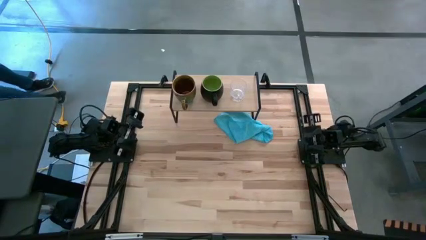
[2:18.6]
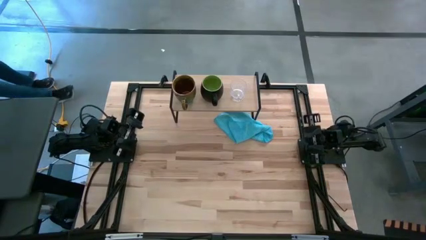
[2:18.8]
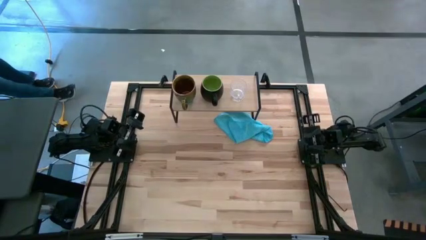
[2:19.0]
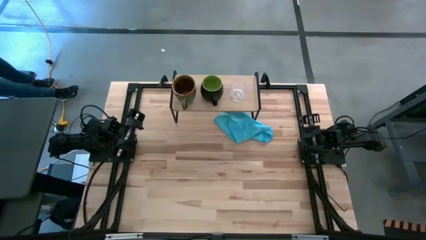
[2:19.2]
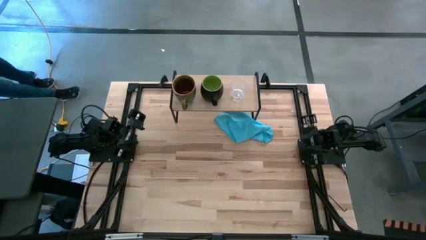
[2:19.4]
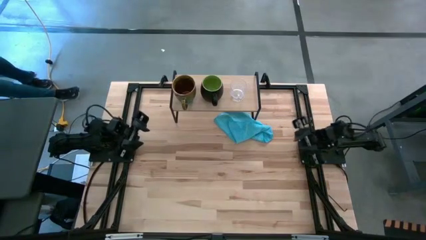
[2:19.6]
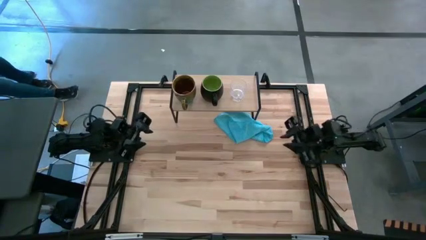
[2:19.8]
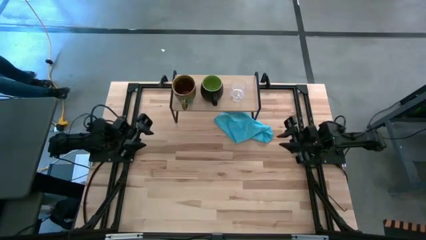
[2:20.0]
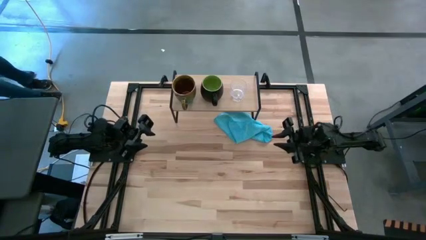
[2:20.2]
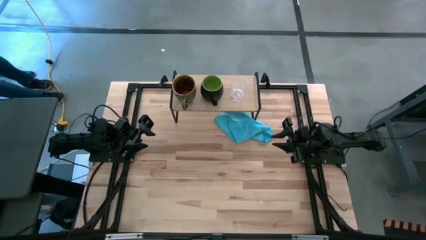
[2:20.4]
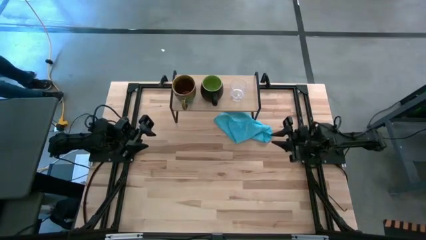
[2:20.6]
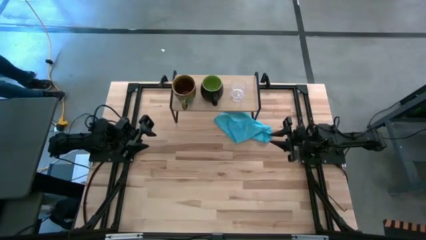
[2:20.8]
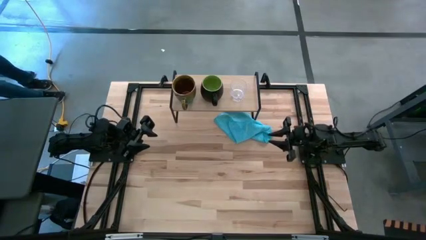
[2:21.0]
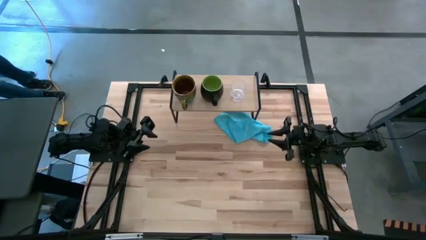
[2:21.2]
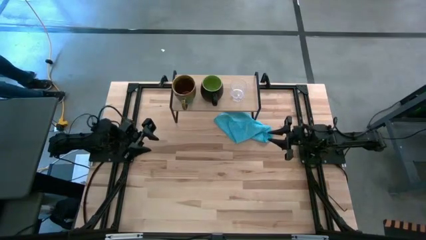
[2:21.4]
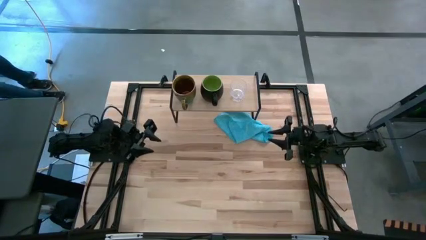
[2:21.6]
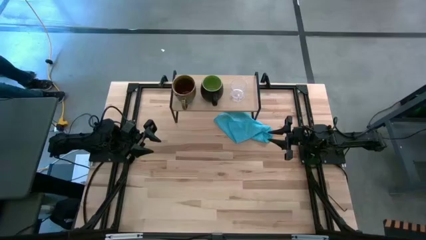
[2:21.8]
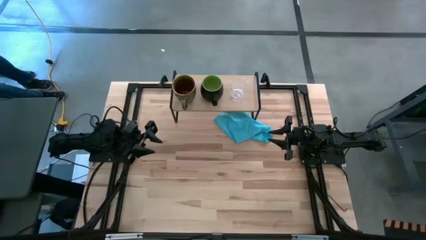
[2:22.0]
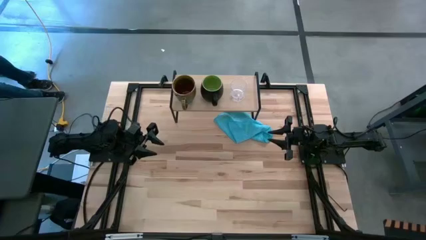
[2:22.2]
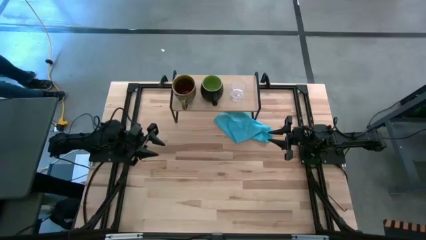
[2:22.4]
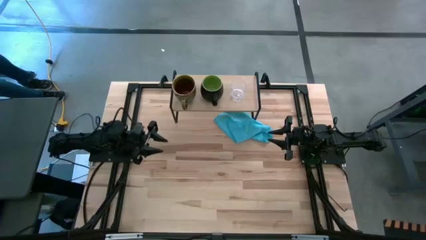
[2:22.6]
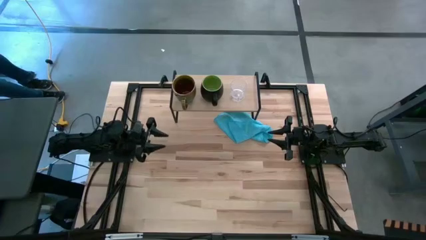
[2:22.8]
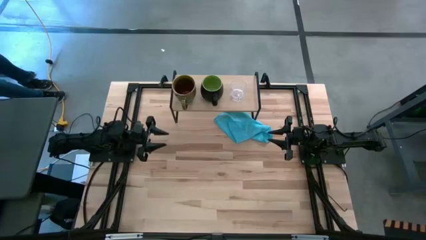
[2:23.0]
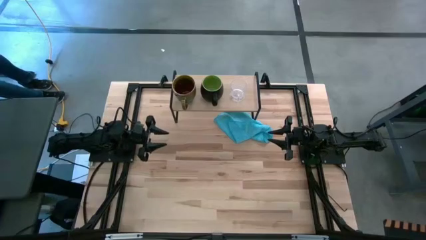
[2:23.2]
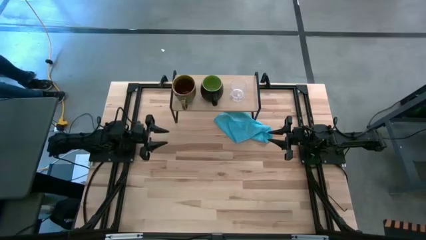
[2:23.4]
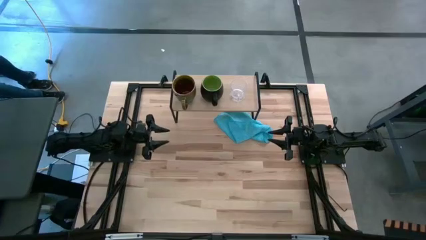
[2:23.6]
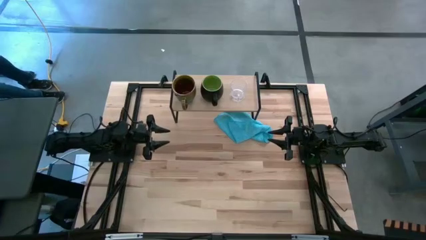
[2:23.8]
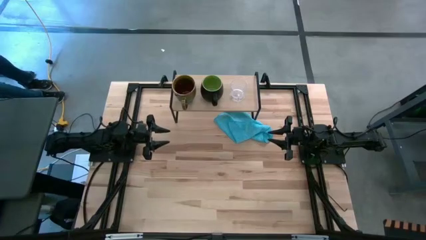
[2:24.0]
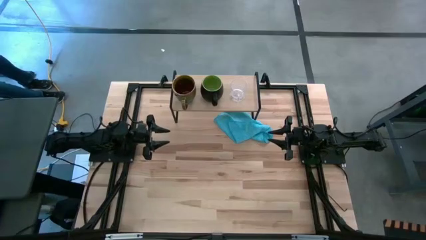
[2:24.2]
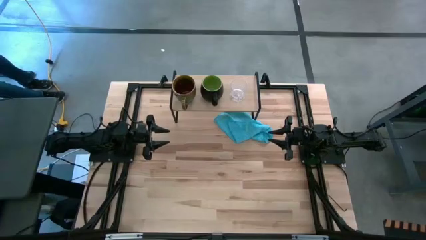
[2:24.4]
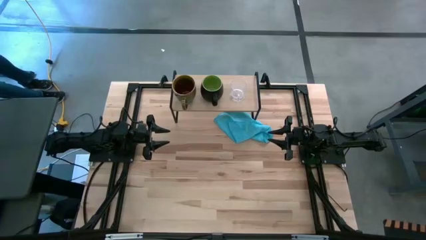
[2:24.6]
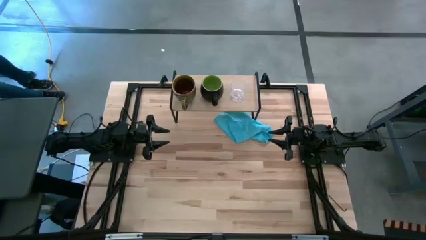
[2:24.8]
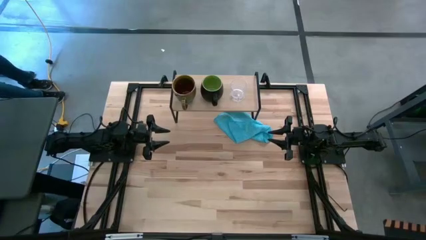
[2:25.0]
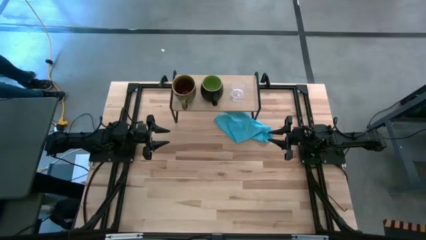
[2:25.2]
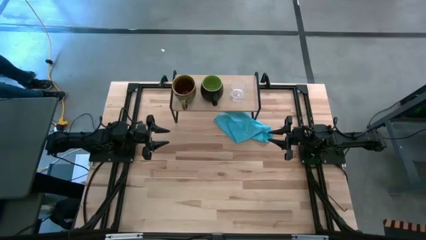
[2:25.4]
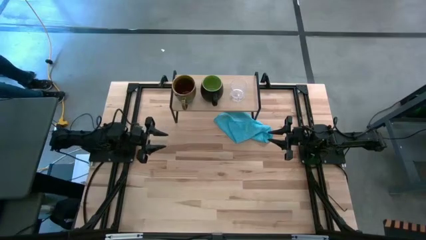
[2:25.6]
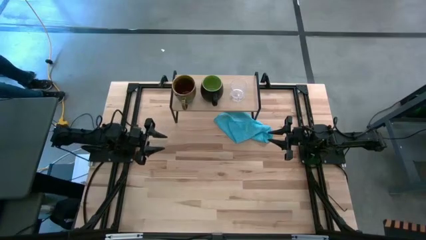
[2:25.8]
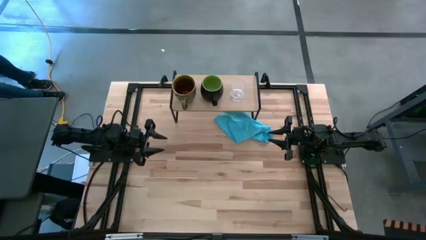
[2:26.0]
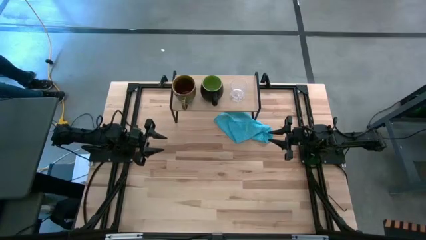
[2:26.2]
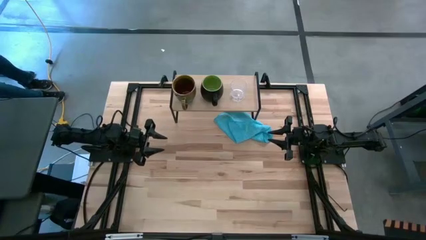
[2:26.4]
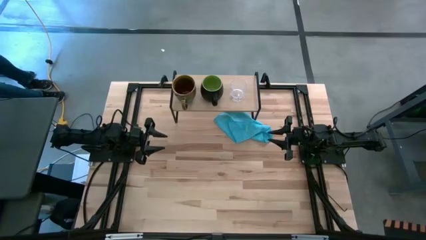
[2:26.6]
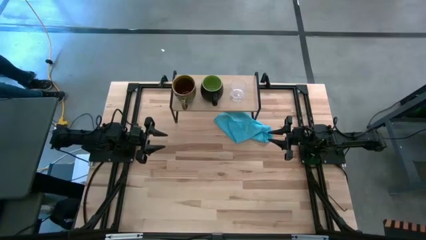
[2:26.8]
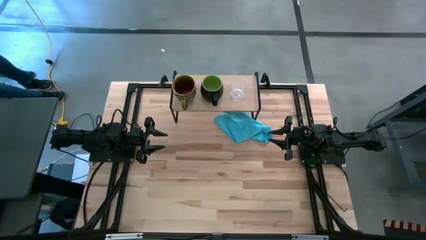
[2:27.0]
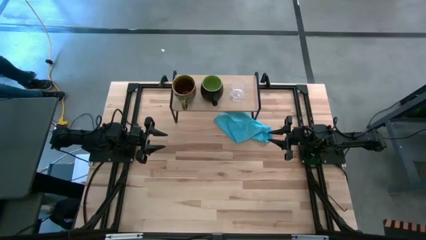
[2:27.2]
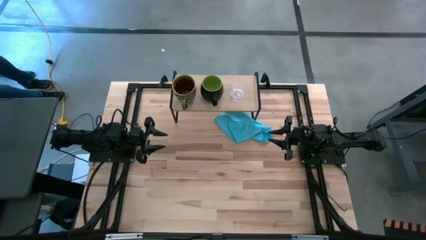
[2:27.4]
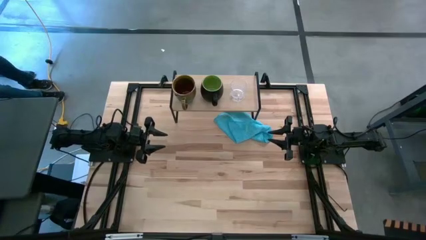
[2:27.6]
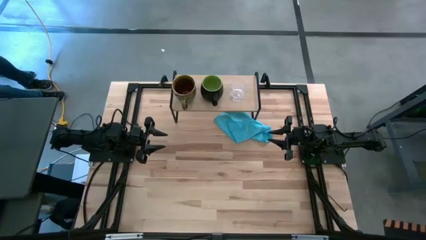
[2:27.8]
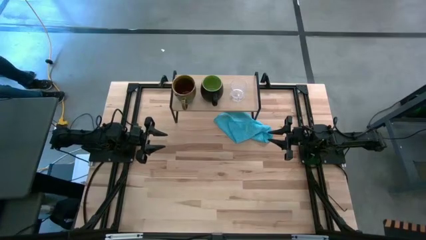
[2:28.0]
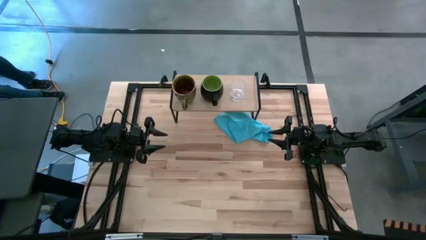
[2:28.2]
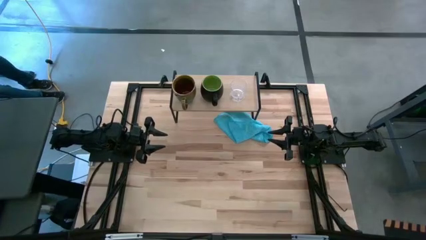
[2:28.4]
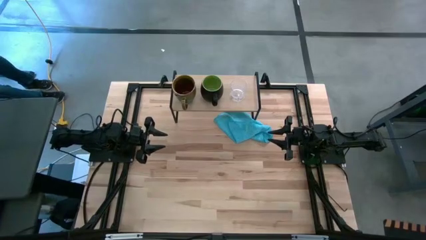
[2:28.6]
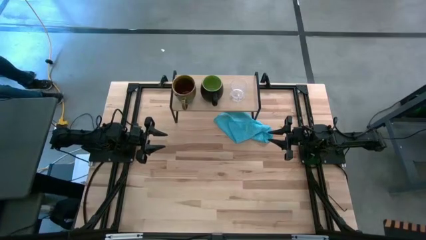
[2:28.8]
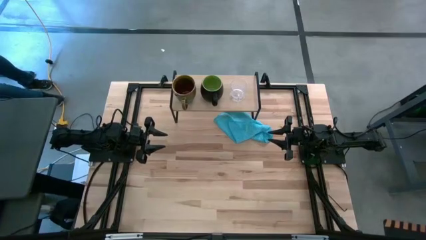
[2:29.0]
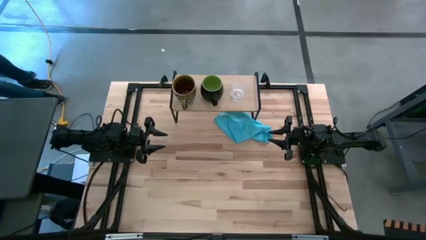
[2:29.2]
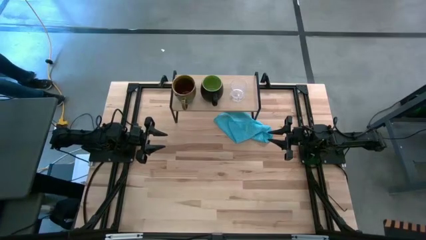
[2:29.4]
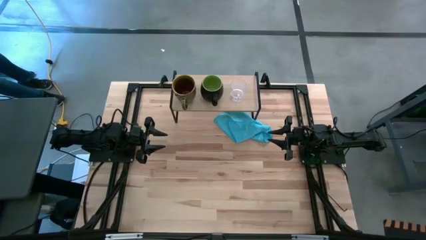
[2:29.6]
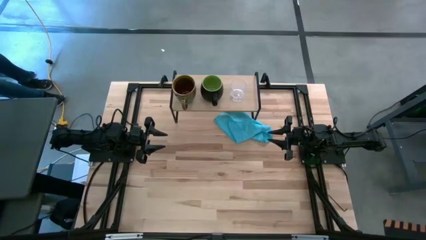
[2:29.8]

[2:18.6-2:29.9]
Task: Stack small to large cups/mugs on shelf
Return to Home Position

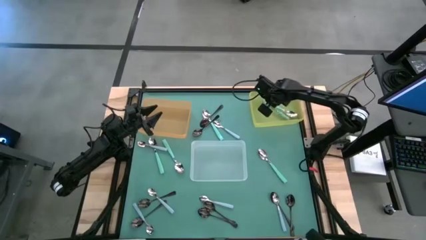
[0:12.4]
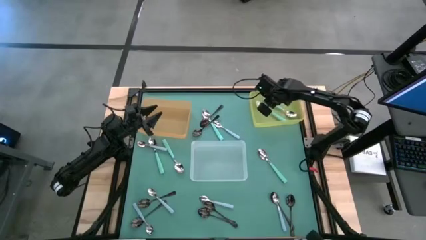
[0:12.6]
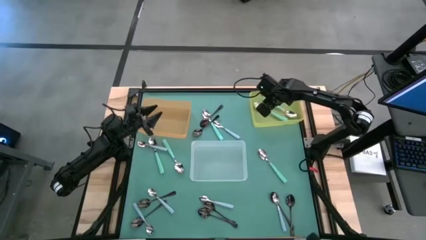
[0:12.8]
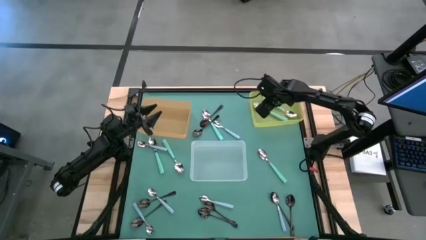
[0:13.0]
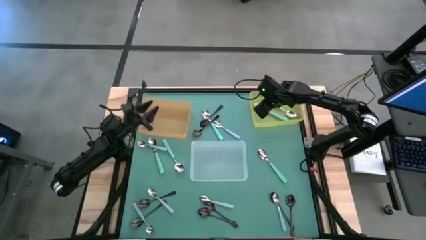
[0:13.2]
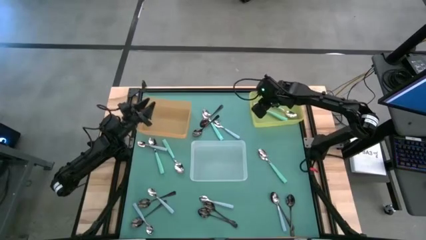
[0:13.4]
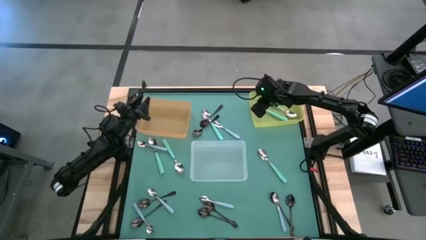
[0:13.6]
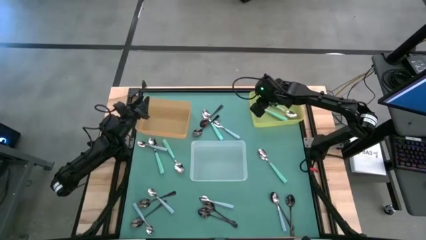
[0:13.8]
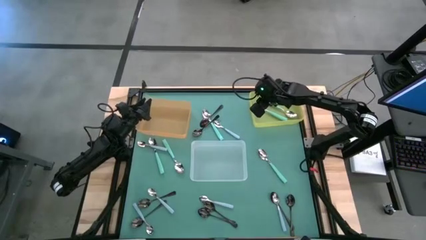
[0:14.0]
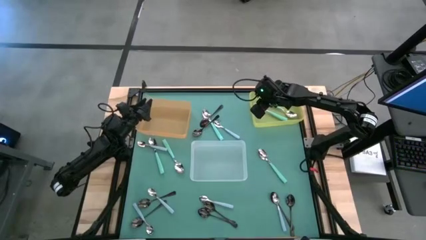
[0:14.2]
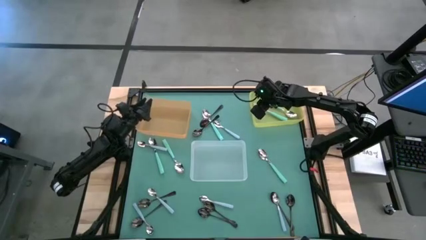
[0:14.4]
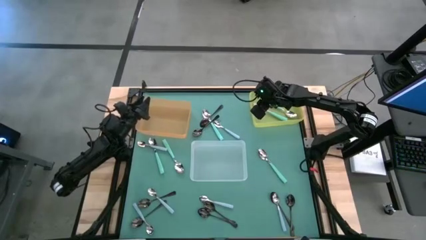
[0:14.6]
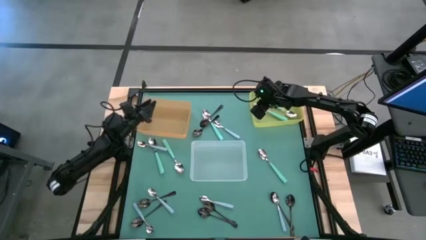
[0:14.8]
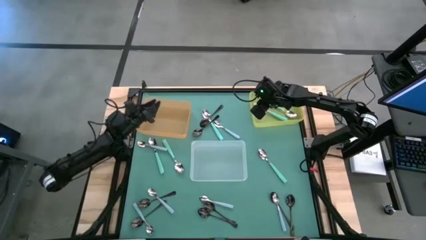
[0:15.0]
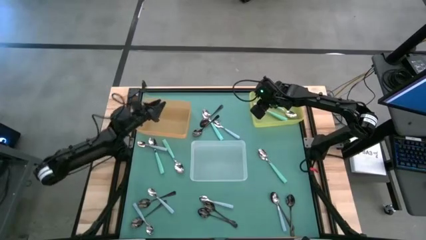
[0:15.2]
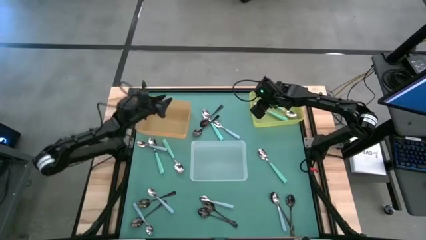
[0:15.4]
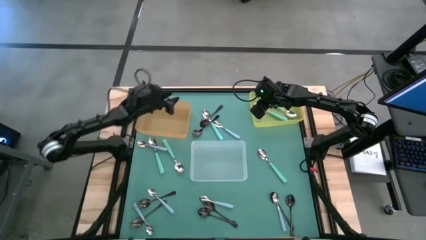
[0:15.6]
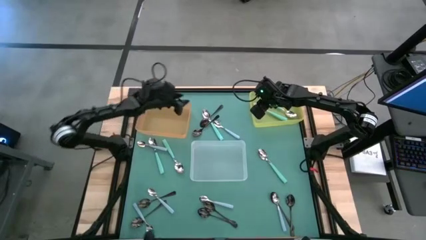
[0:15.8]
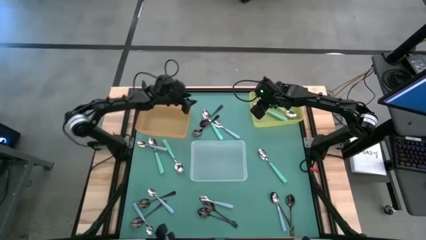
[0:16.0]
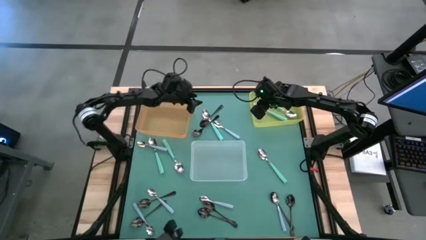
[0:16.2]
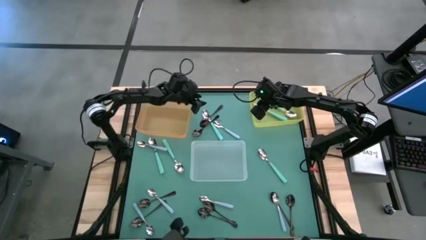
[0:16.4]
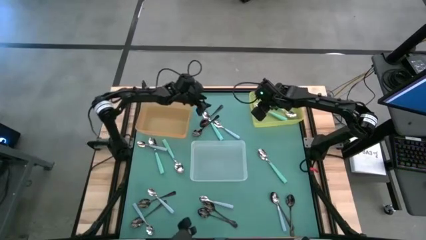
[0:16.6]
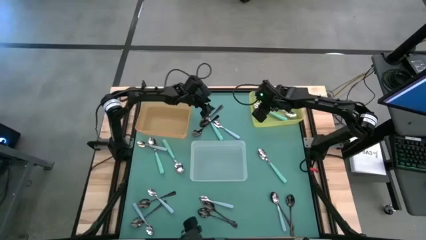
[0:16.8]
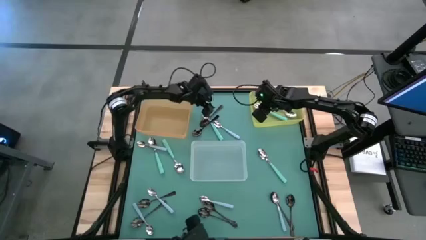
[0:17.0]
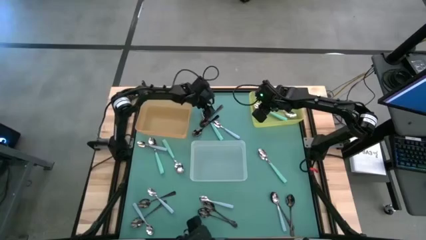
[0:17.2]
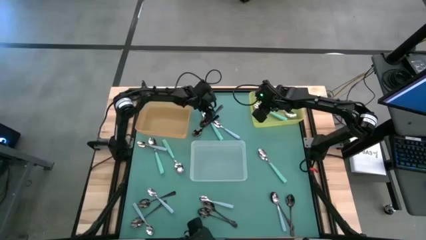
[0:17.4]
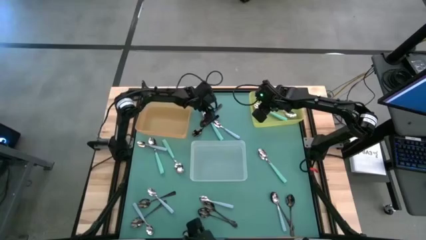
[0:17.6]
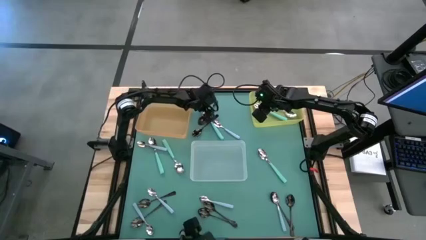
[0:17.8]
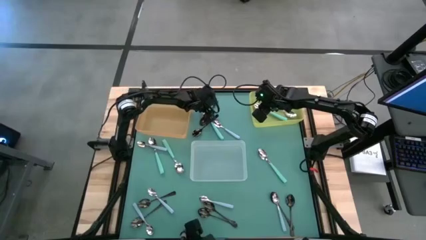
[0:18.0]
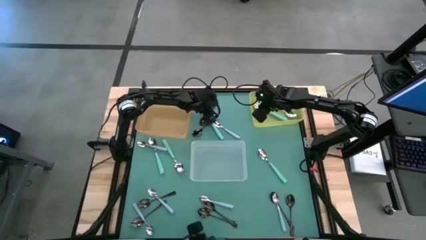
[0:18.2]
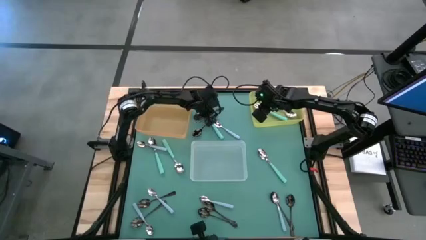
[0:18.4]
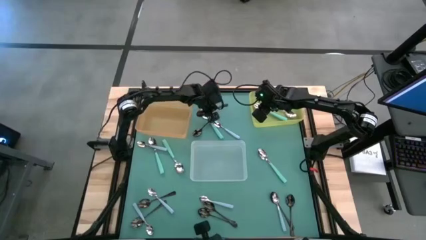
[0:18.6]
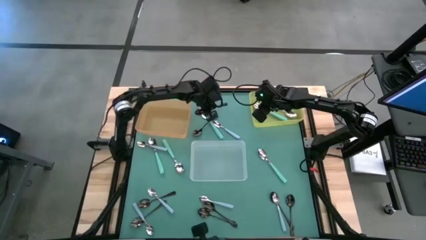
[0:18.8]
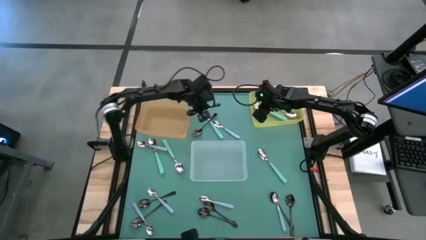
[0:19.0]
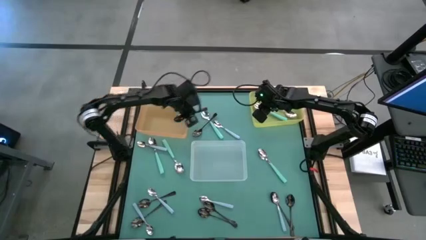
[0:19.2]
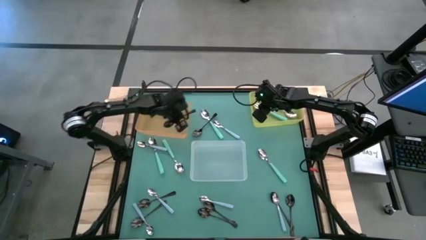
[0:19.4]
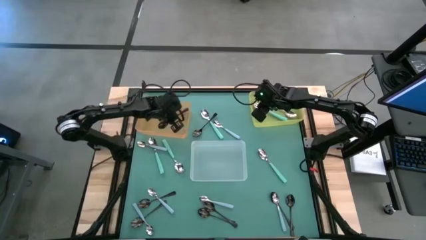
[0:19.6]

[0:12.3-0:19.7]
Task: Sort silverware by color (type)
Put the black spoon into the orange bin
